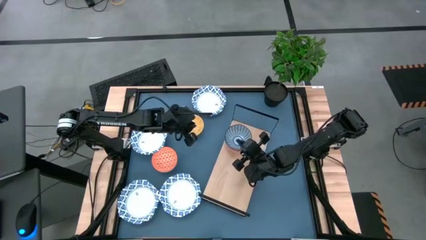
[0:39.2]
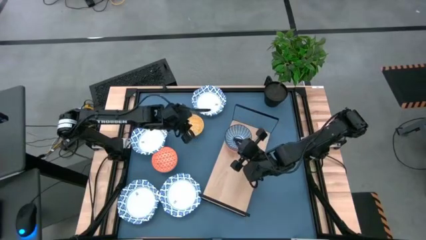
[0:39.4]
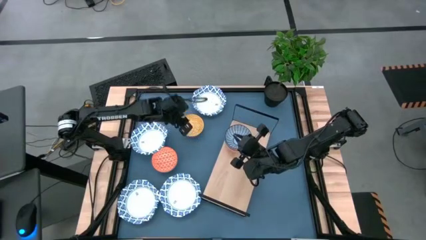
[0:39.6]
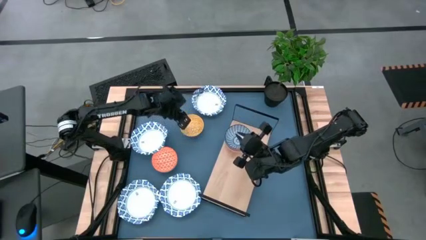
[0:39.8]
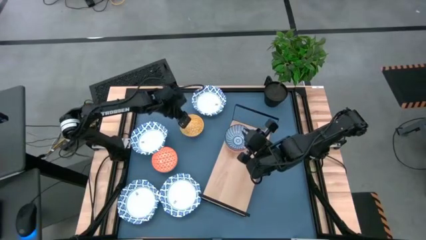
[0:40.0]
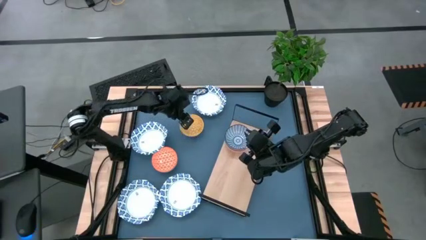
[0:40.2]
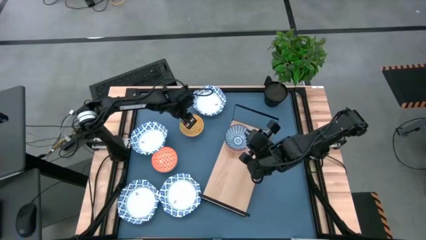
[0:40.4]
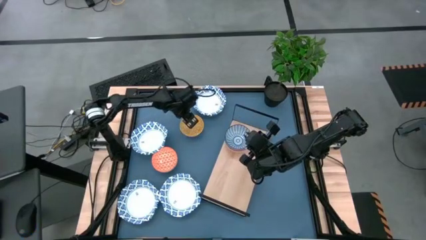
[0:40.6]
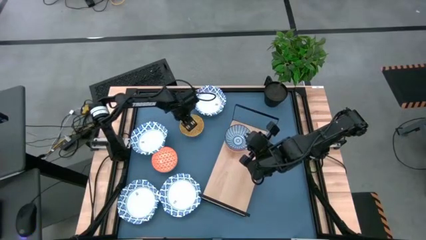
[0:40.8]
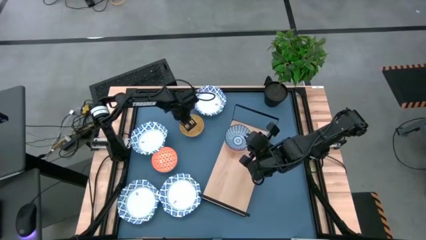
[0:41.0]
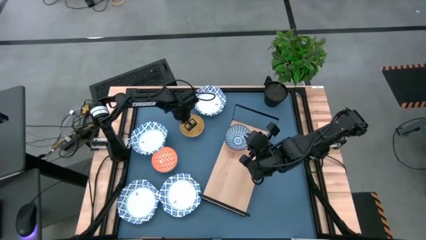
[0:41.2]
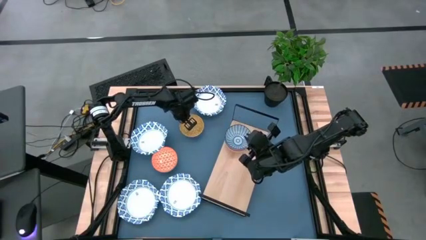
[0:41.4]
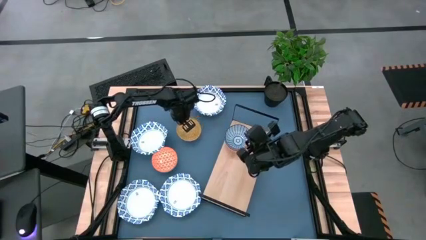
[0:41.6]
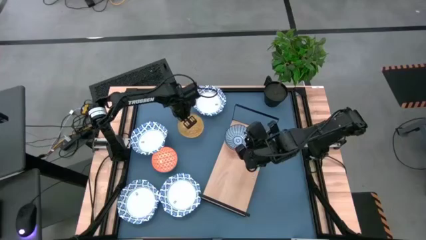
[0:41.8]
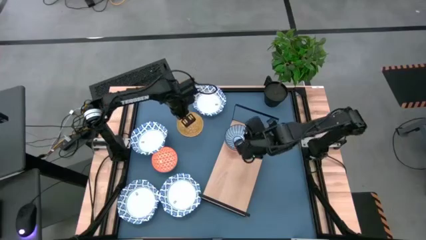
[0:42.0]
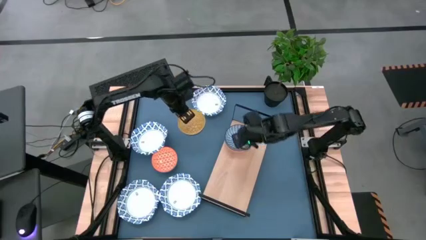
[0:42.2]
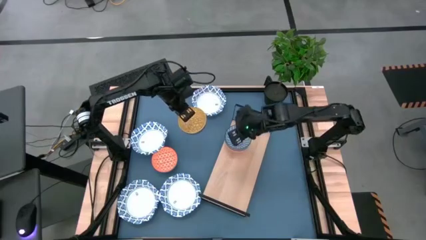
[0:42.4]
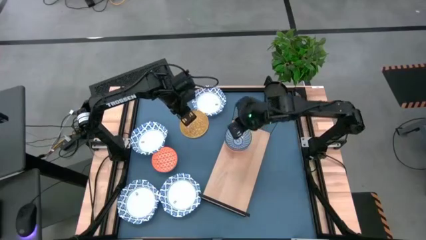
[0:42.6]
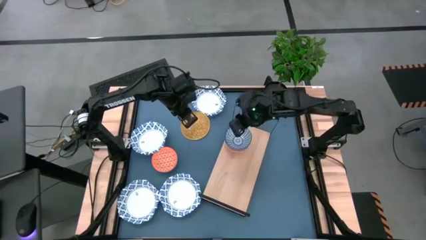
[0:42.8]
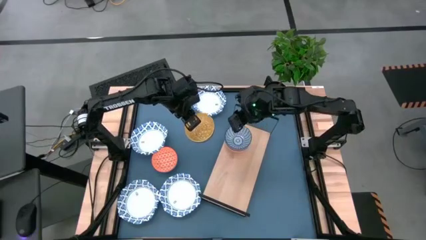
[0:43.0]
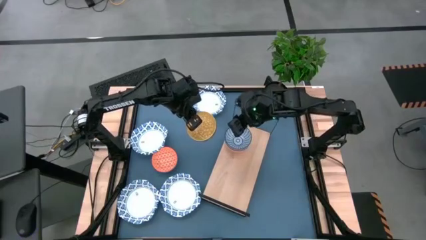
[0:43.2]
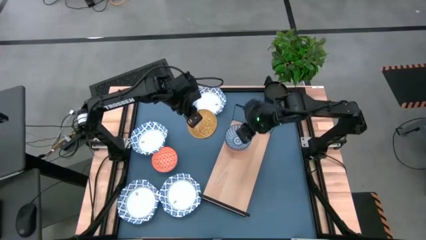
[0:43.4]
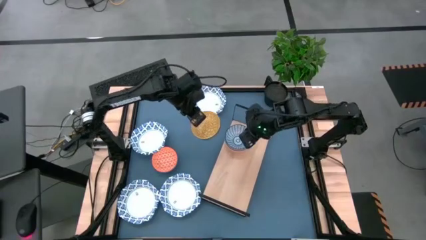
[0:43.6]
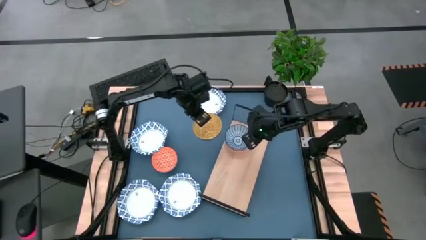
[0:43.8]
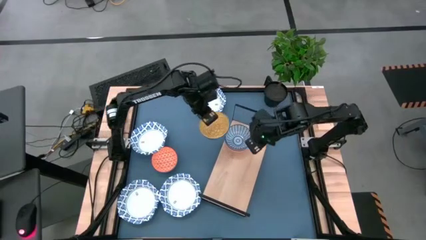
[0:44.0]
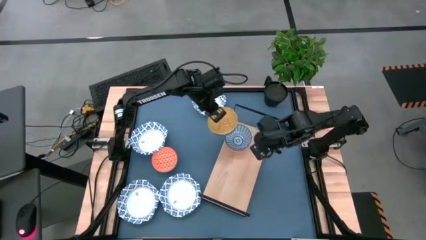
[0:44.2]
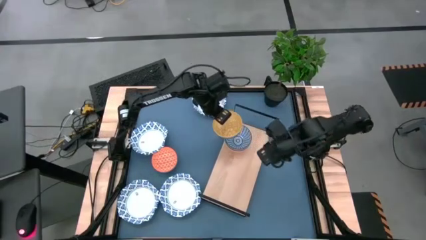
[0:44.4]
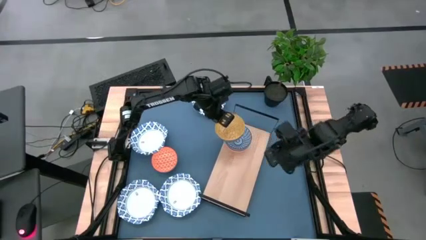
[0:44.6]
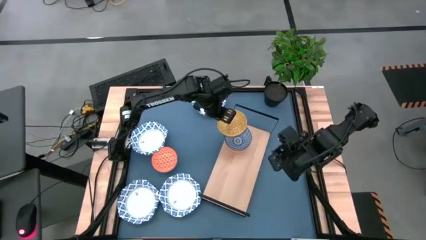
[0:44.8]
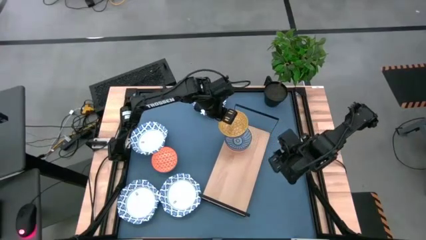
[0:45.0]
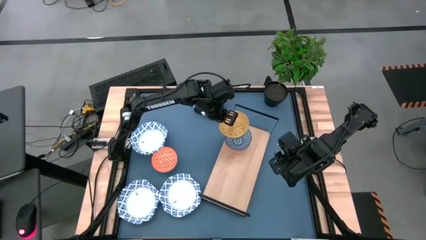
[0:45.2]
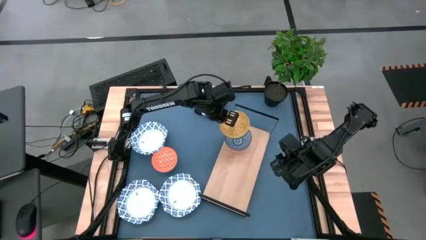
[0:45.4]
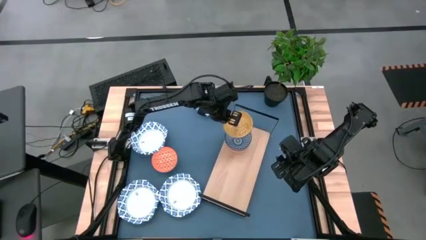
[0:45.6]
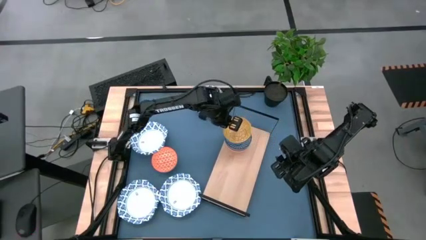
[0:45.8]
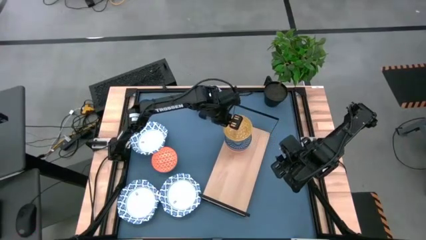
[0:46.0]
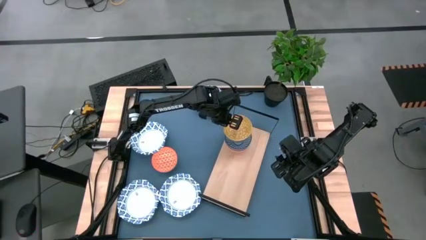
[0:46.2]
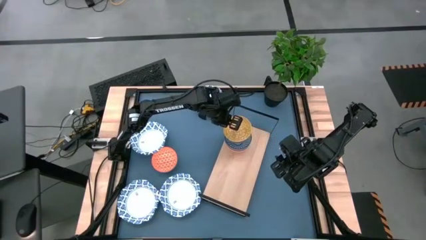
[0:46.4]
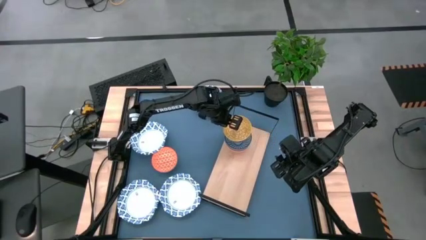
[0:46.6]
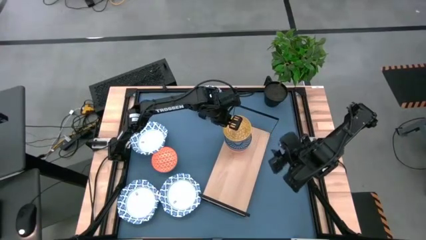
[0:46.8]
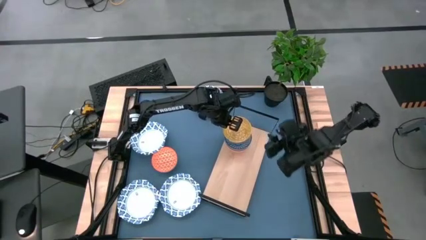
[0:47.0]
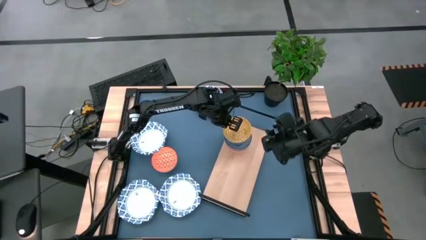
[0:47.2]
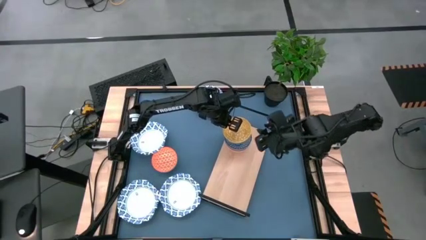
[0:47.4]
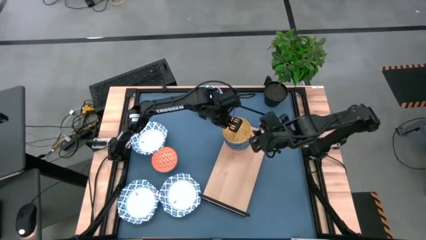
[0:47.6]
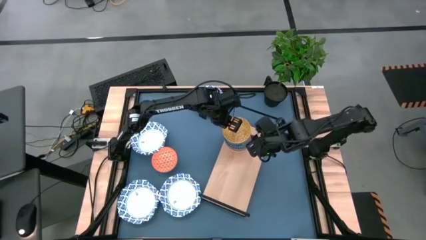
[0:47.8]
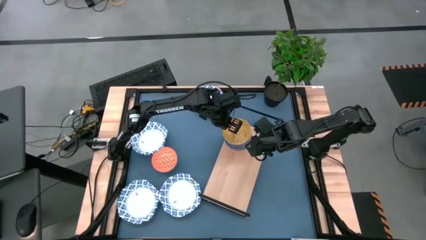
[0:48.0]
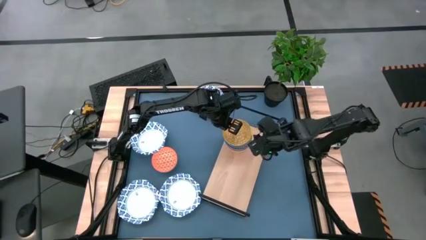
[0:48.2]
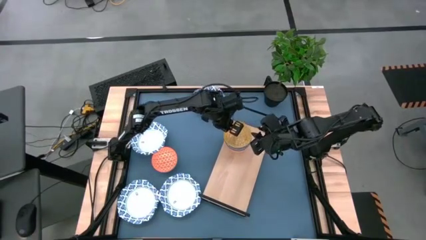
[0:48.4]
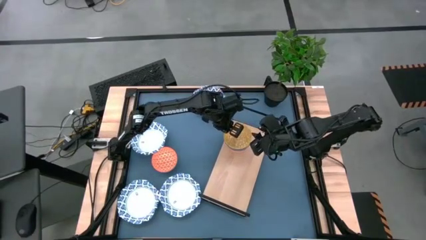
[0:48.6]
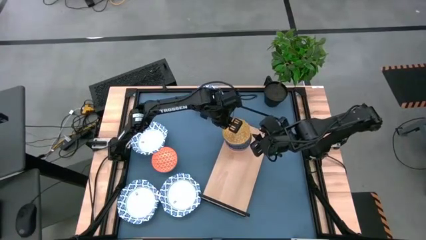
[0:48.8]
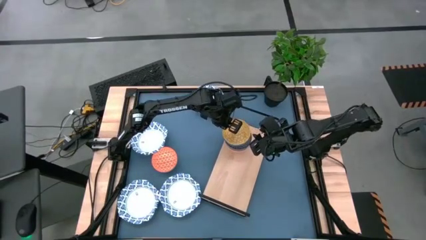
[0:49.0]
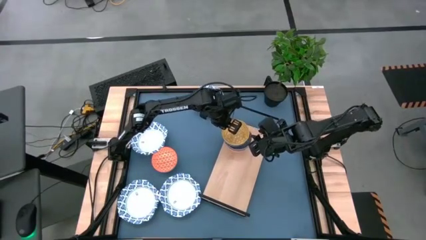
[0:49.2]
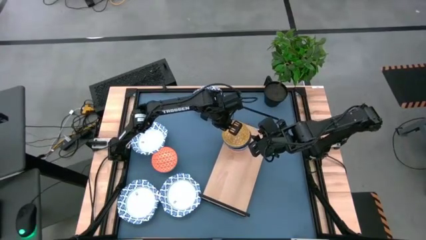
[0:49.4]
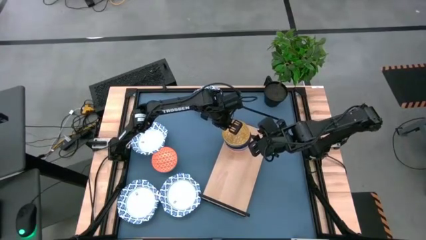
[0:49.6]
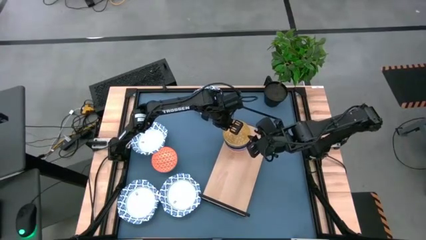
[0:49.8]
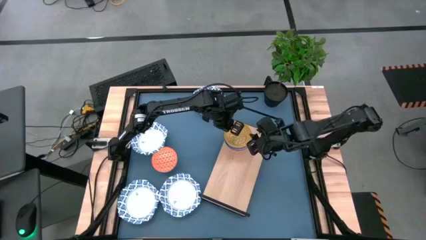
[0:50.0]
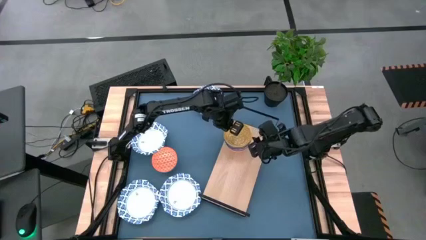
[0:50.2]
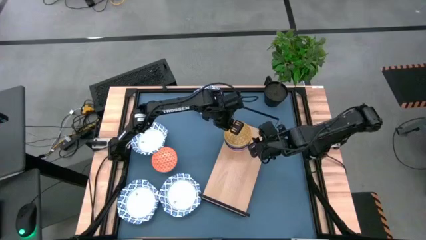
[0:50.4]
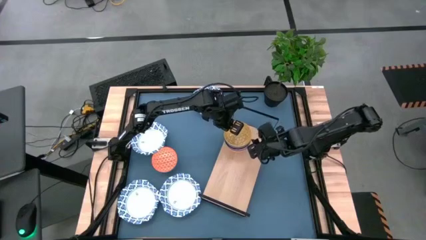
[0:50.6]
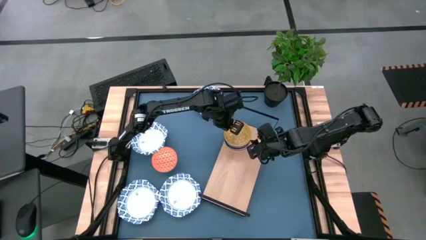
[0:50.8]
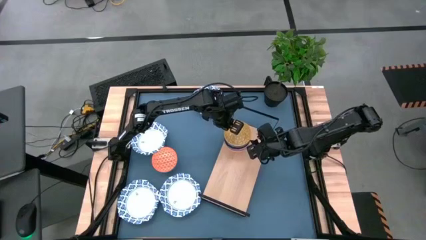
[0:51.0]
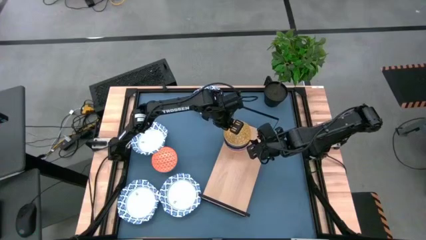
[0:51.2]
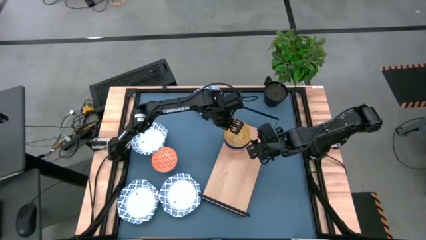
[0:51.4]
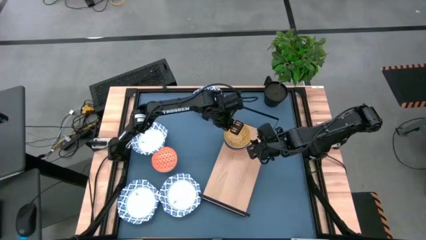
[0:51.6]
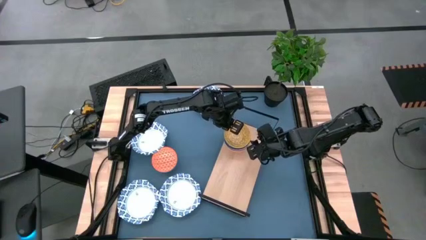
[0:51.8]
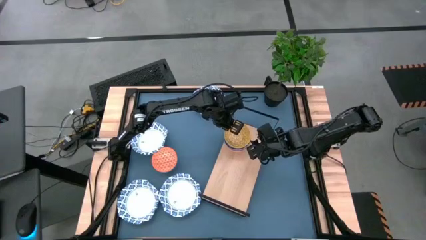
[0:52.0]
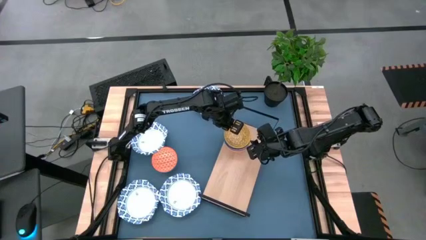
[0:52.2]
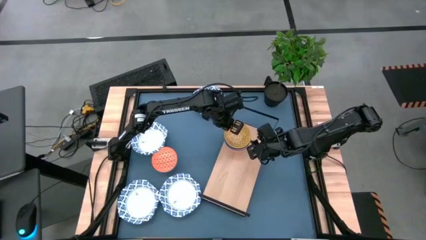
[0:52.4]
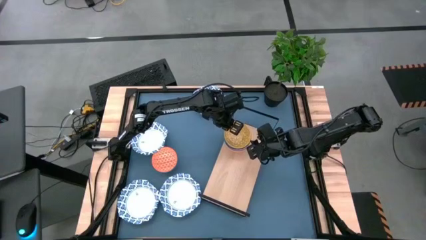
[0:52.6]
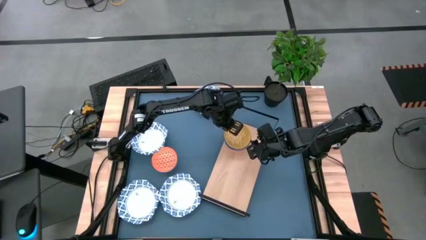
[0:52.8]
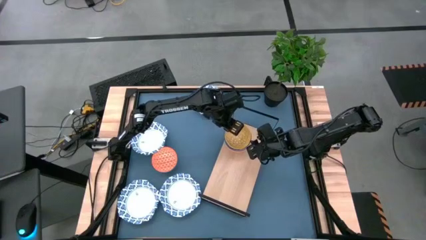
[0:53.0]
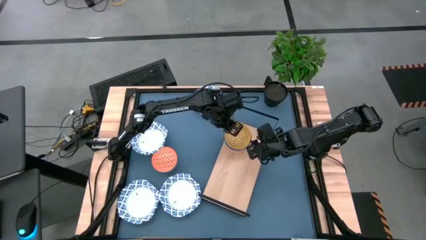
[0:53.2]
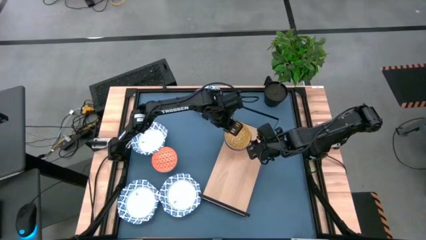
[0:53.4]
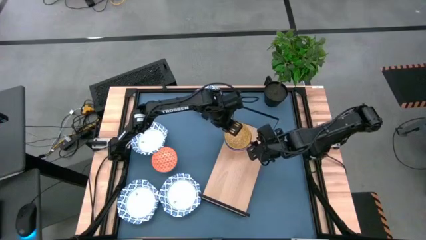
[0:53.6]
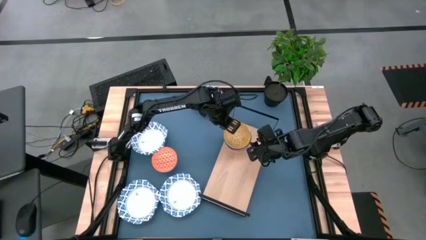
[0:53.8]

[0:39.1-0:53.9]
Task: Place and stack bowls onto a shelf
Stack the yellow patterned bowl into the dark blue striped bowl

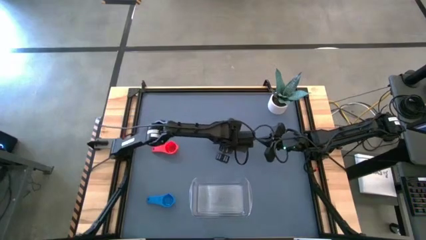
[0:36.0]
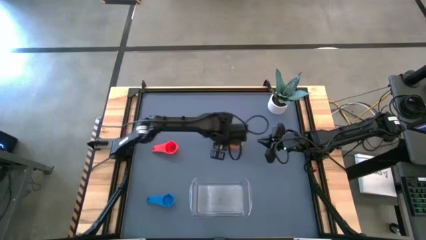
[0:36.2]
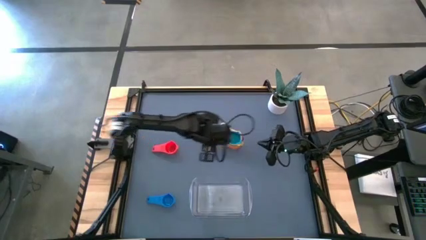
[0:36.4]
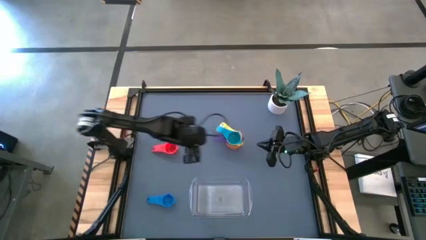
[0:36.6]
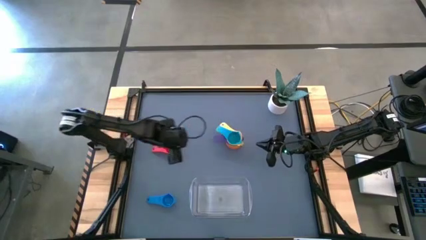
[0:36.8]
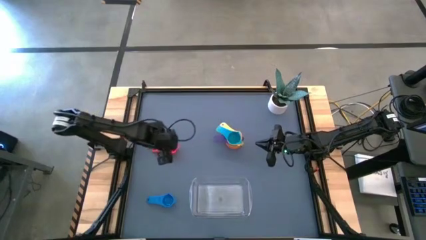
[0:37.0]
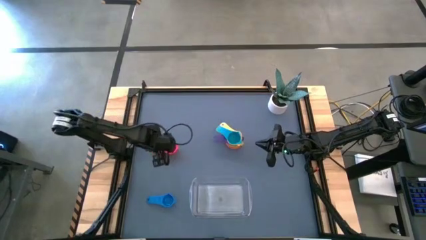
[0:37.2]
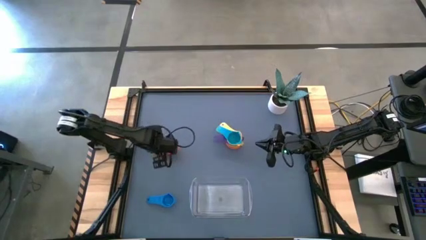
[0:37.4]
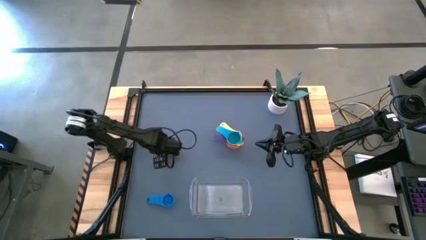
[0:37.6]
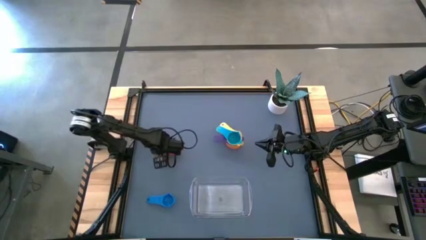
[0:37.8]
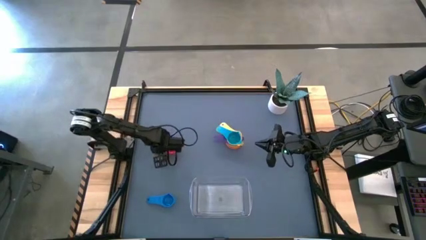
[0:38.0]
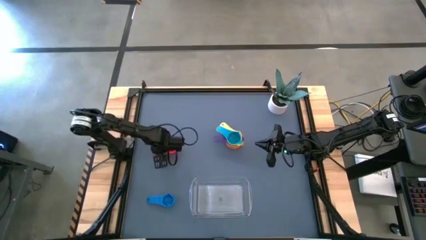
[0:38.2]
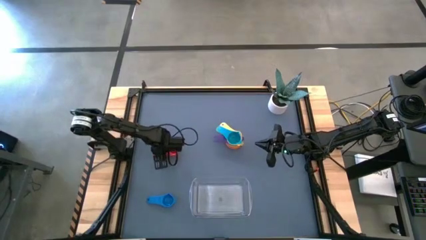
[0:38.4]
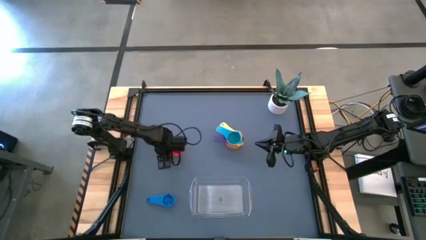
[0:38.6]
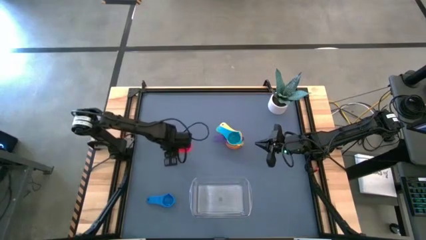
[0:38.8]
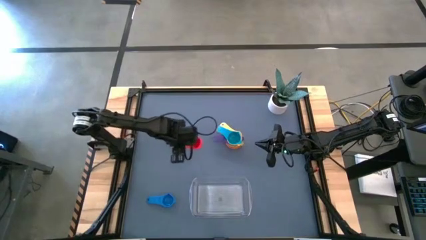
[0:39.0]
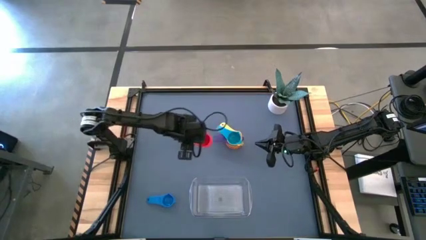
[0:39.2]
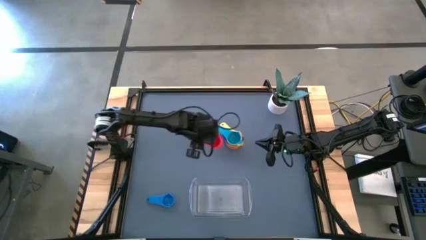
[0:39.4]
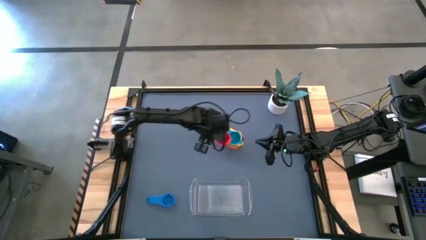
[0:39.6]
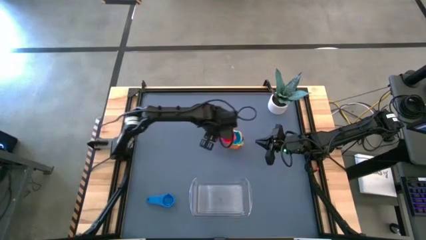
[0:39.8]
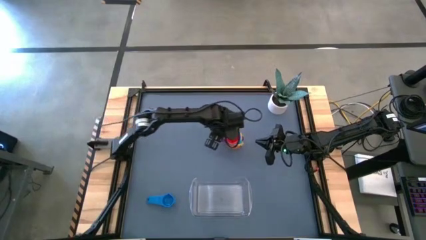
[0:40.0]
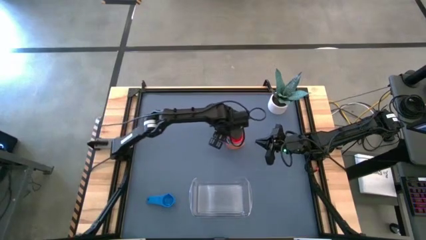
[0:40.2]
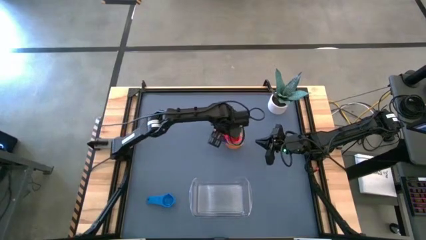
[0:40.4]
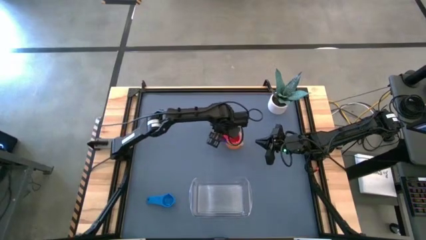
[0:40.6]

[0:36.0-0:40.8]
Task: Nest measuring cups in basket
Stack the red measuring cup on top of the light blue measuring cup
